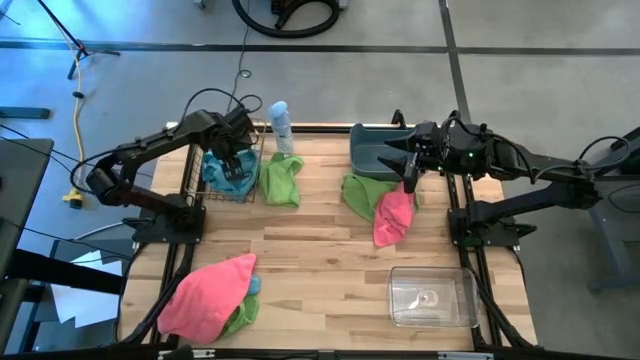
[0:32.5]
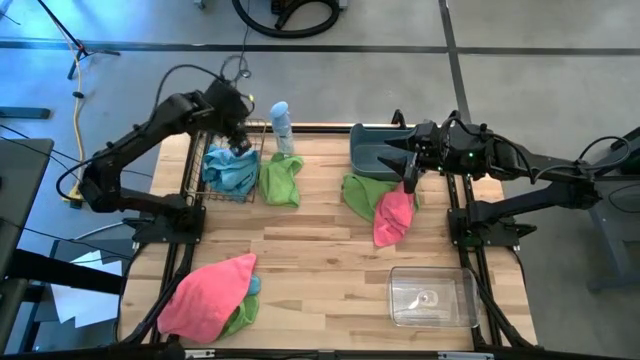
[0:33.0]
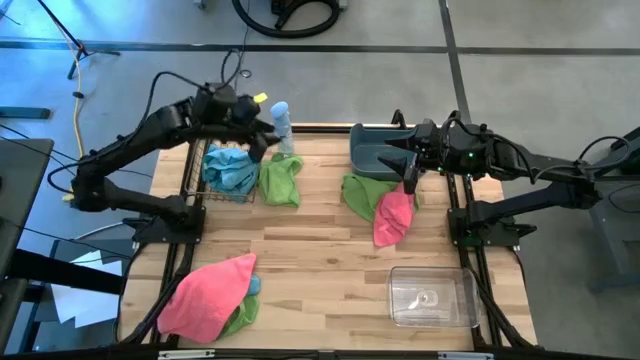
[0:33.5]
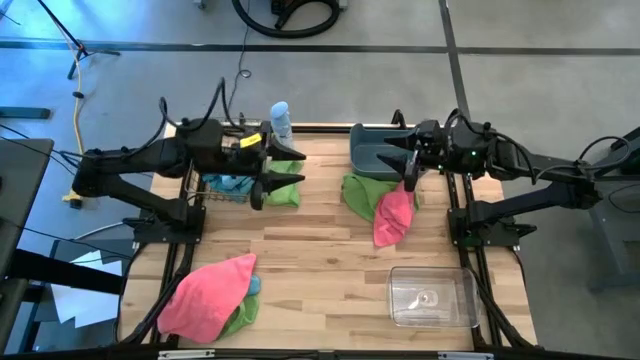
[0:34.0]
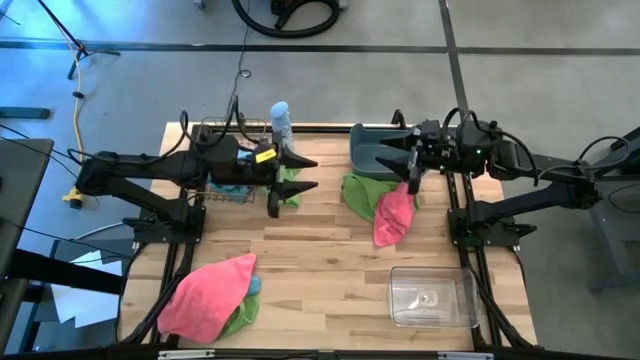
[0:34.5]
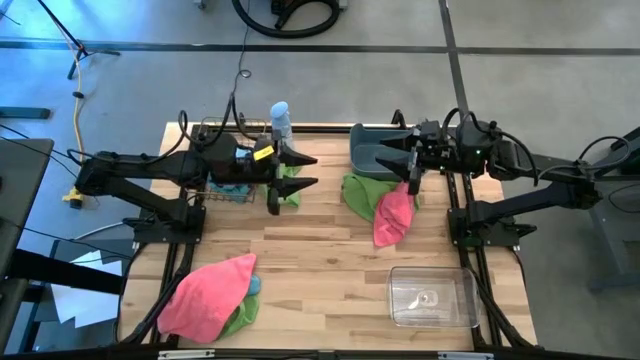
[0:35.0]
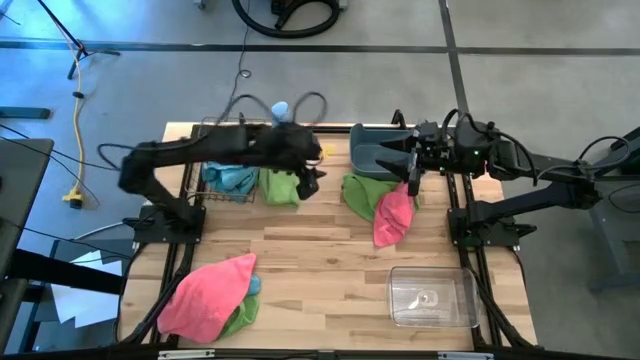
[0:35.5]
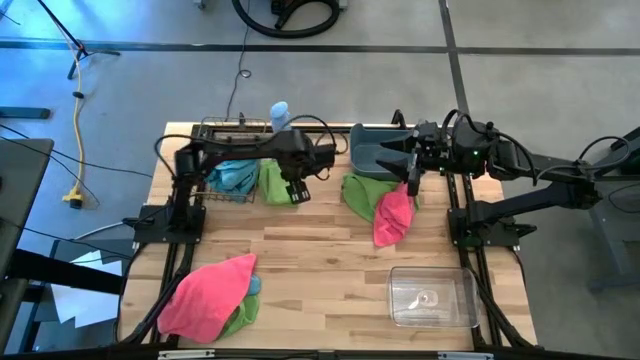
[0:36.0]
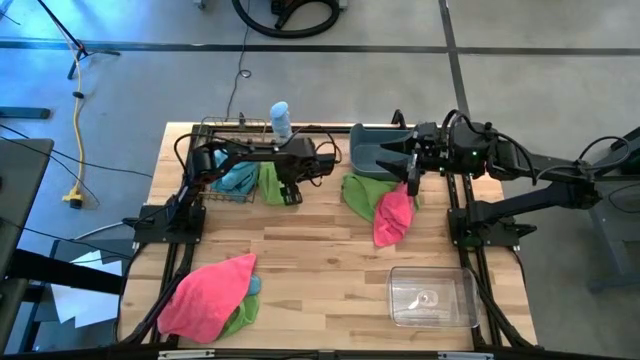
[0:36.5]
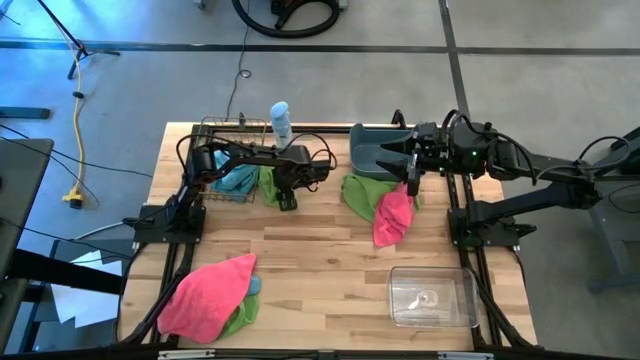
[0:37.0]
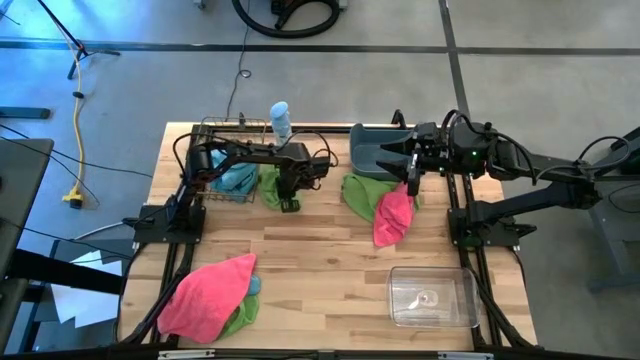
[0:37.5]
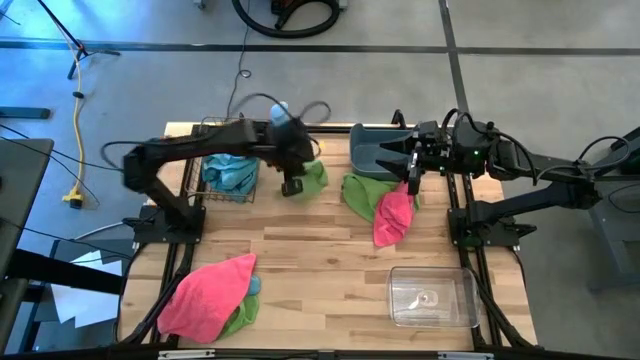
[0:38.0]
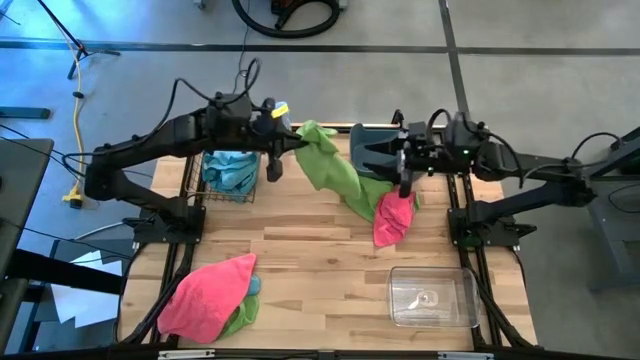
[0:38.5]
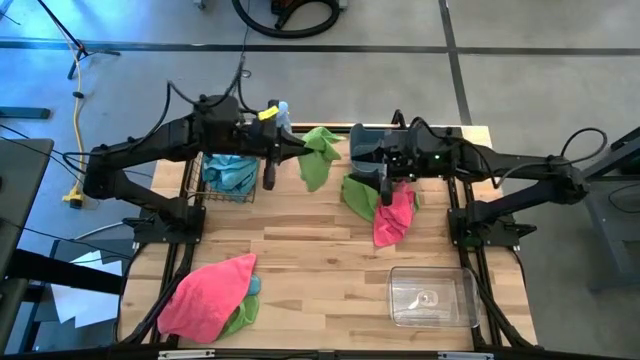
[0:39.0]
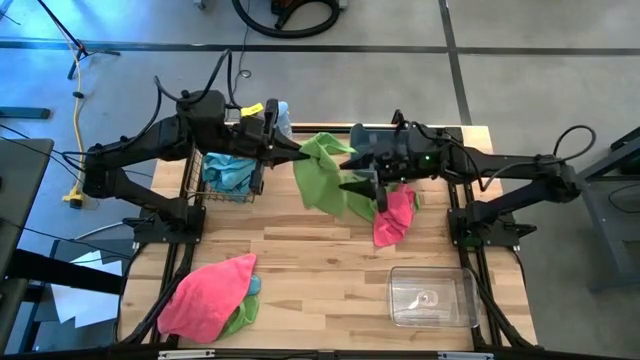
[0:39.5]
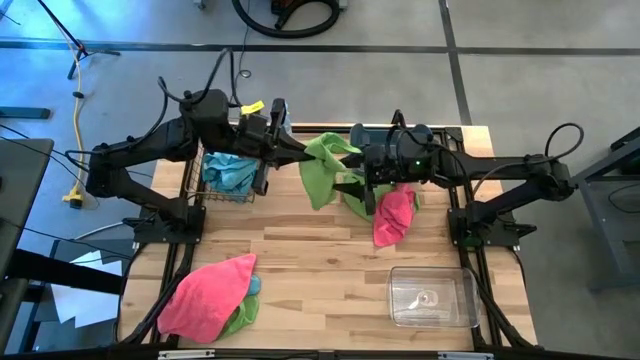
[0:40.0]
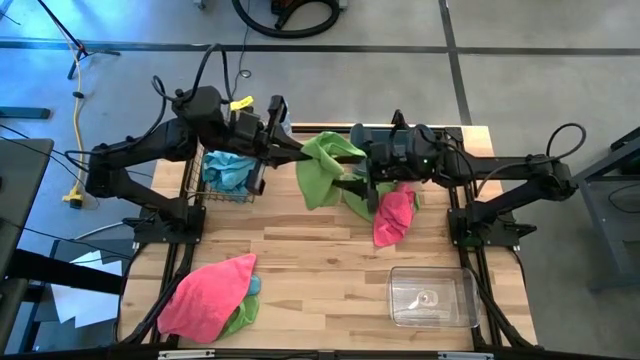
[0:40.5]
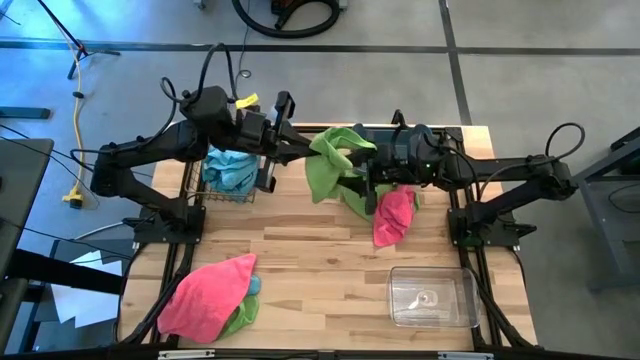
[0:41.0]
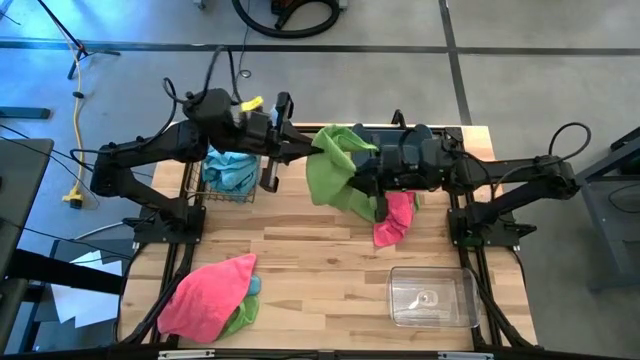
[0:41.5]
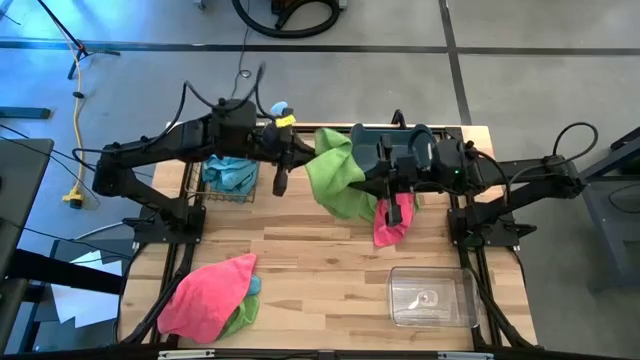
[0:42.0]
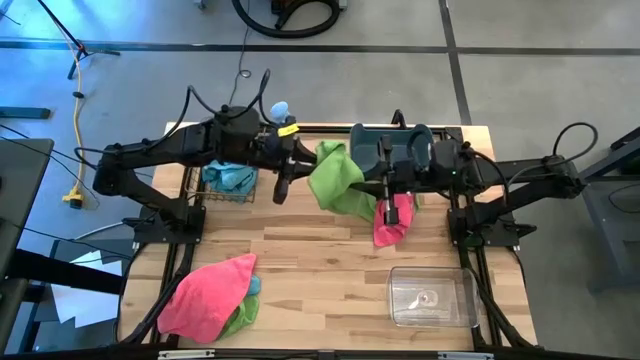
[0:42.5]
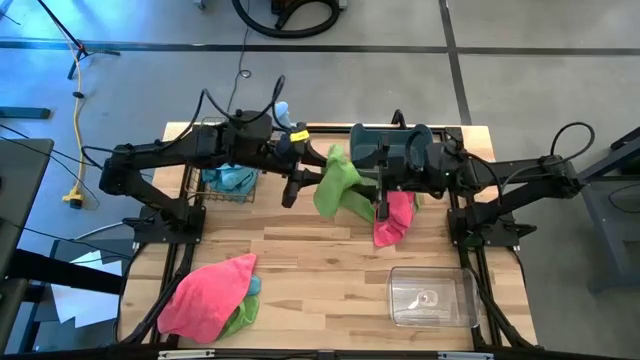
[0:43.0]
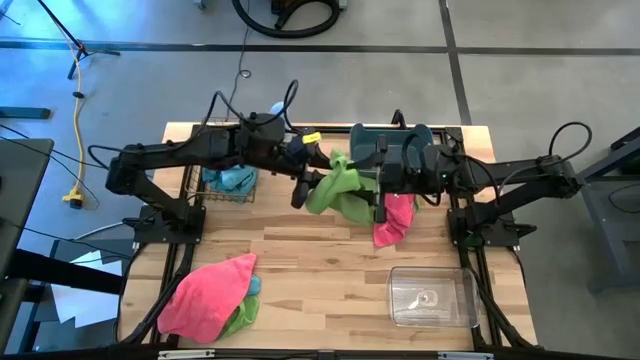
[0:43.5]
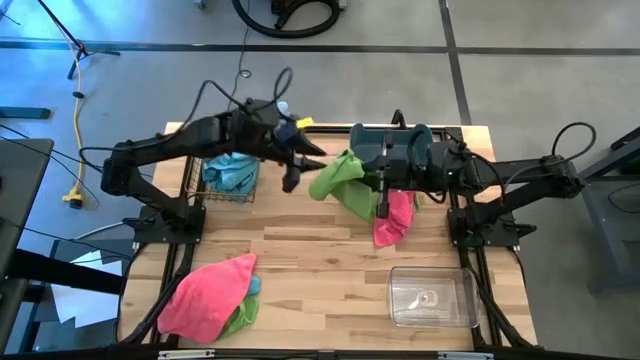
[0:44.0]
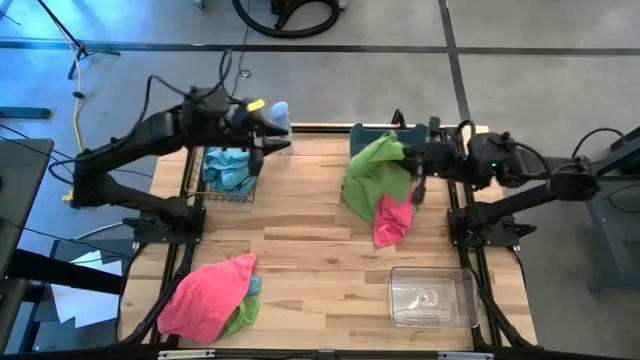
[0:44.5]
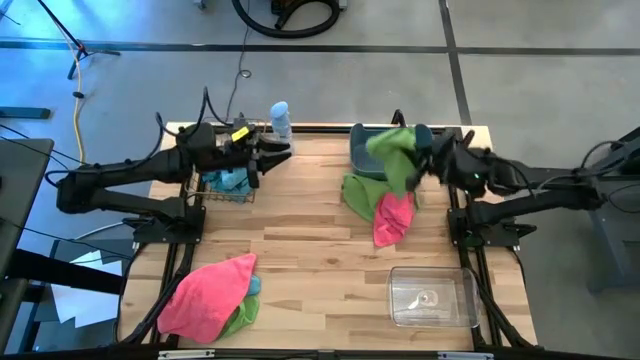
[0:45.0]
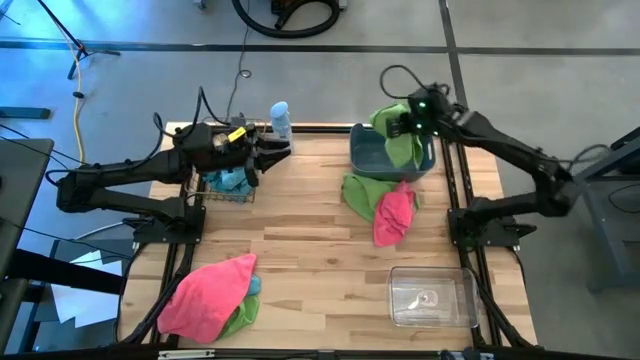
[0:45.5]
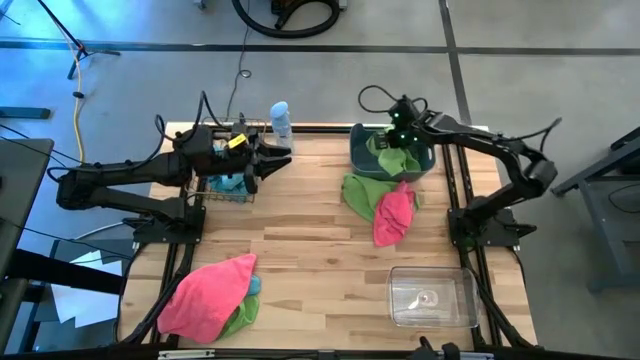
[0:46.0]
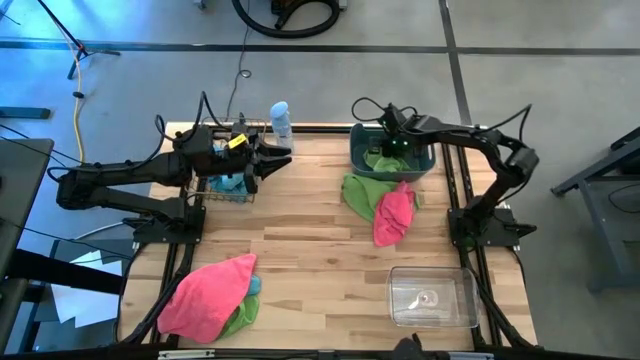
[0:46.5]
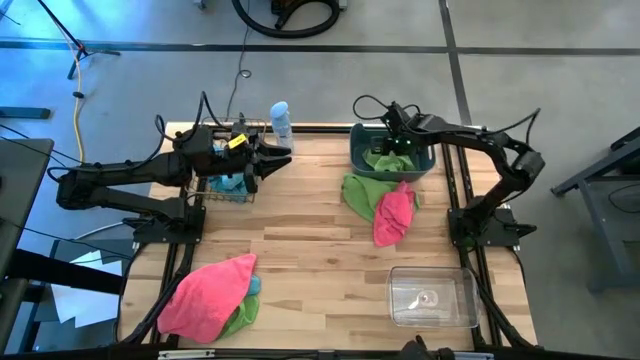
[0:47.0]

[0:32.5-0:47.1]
Task: Sort microfiber towel by color & place in baskets
Put the top left green towel into the blue bin

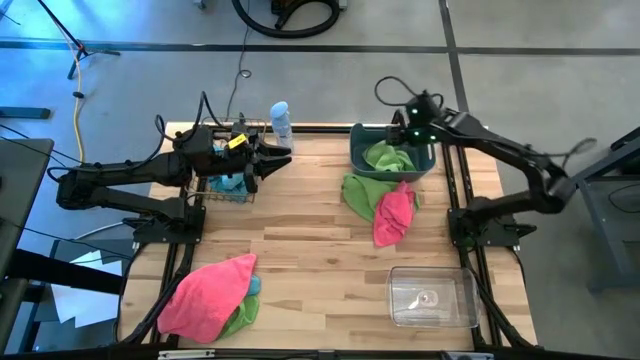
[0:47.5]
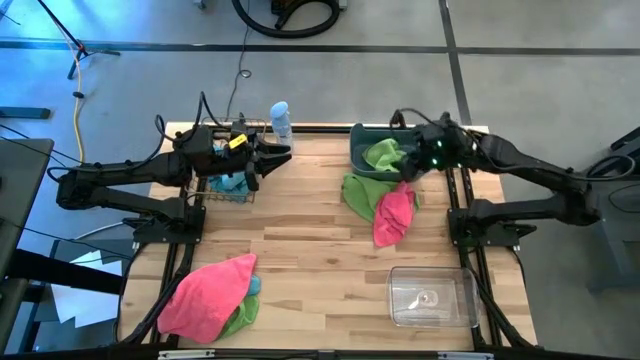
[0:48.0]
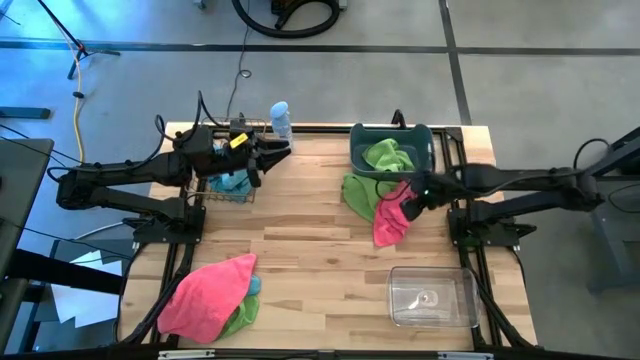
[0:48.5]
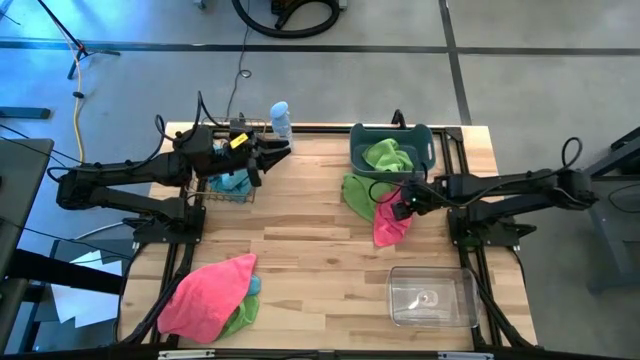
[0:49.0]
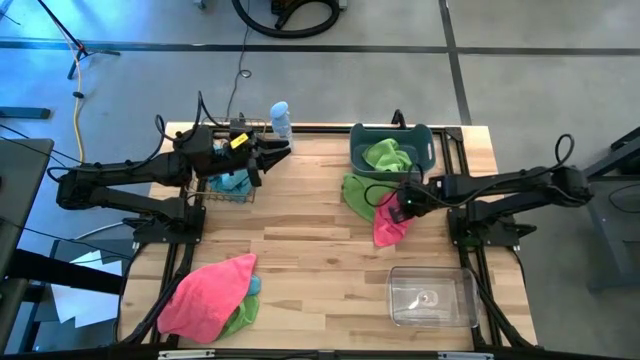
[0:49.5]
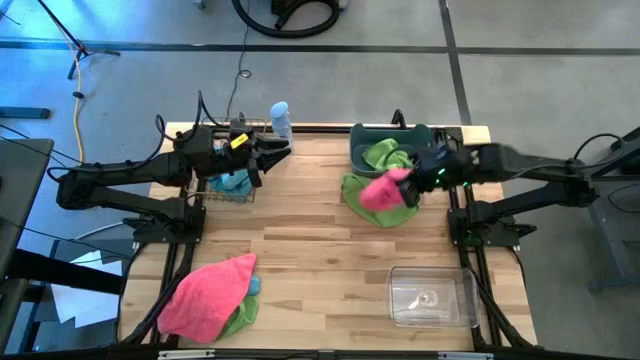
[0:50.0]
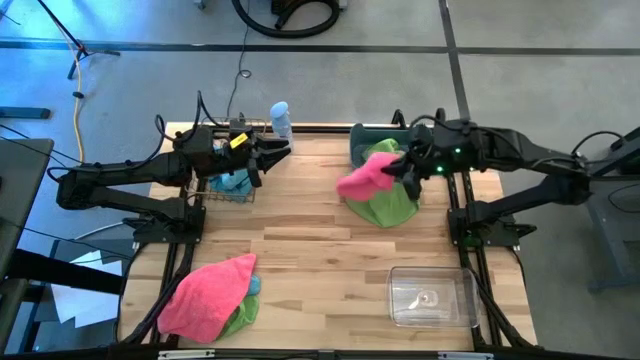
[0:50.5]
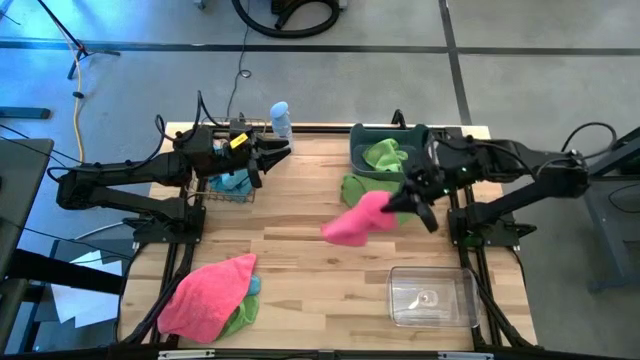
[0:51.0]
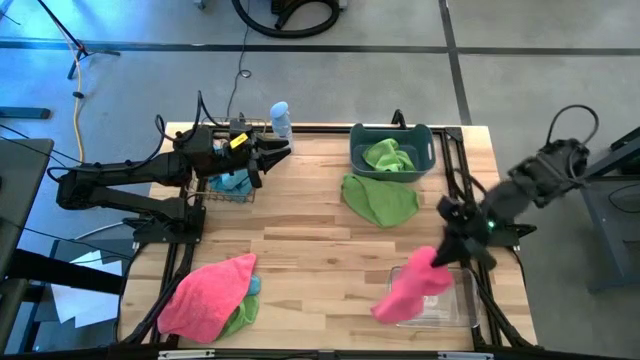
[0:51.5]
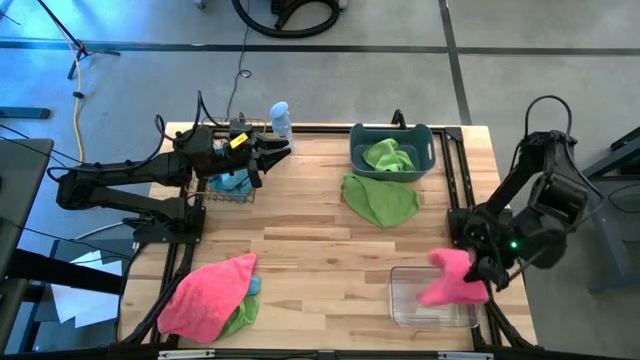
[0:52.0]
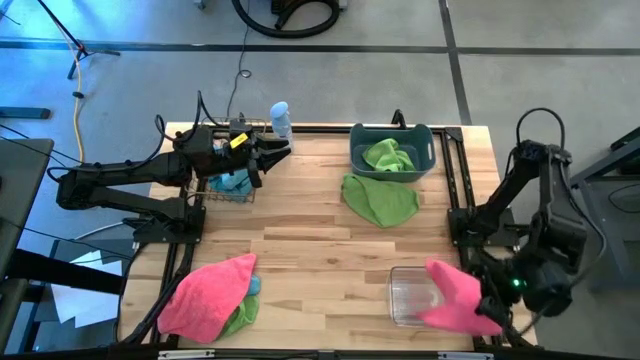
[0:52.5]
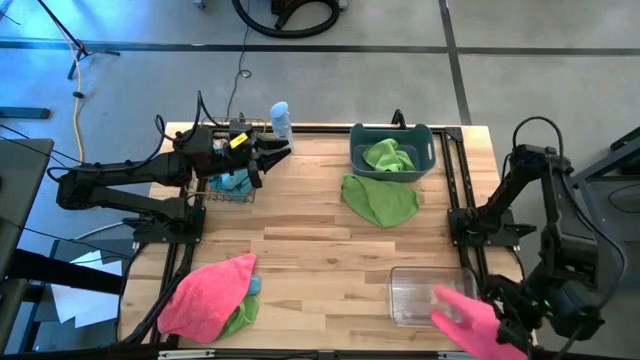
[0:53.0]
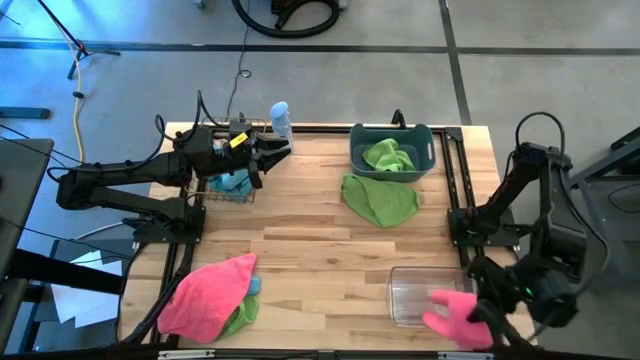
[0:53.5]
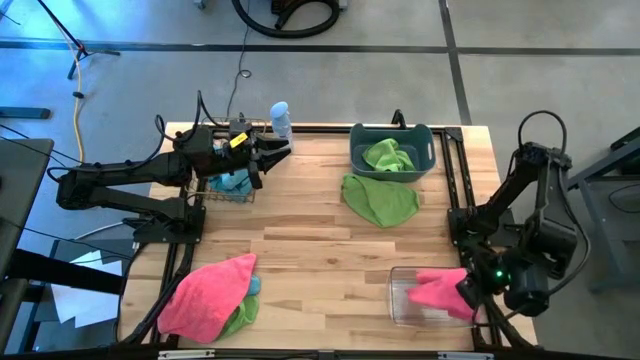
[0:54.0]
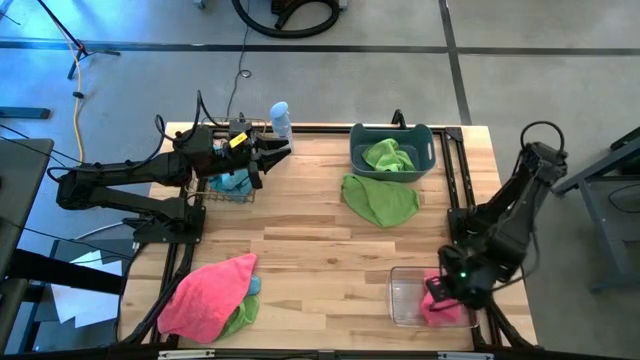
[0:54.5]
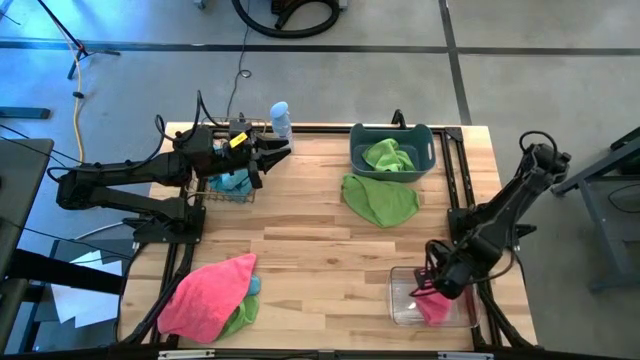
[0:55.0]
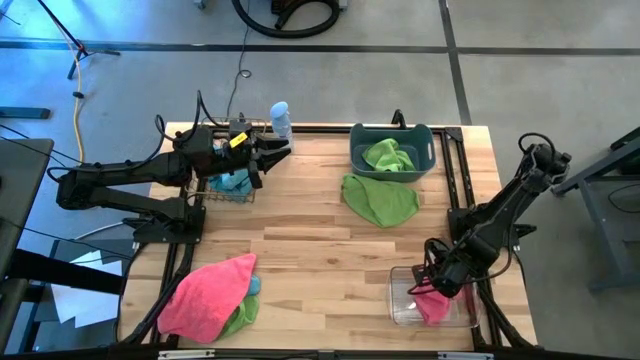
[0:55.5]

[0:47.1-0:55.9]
Put the top pink towel into the transparent bin
